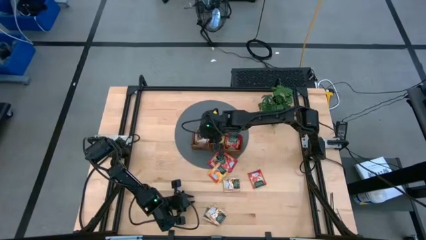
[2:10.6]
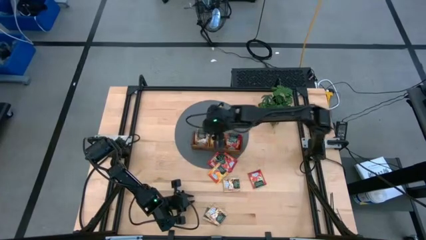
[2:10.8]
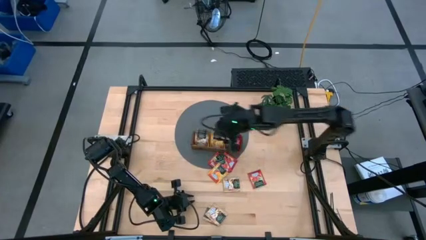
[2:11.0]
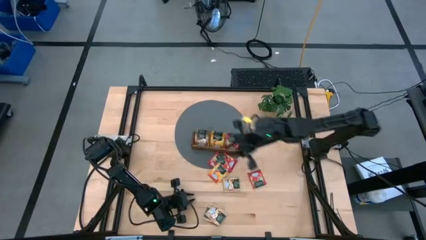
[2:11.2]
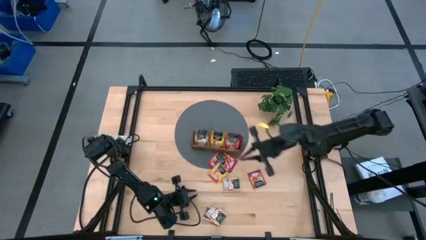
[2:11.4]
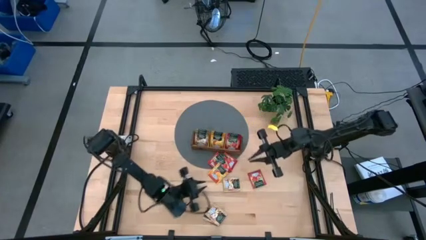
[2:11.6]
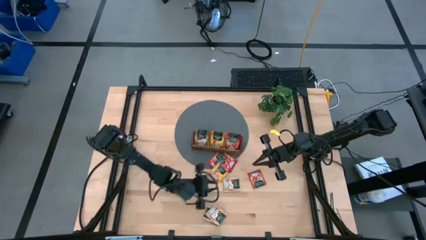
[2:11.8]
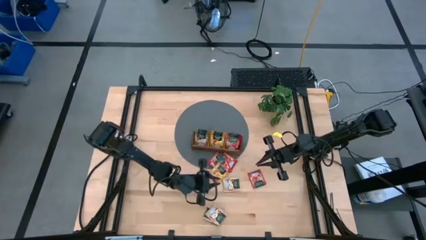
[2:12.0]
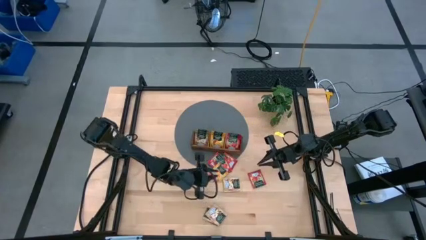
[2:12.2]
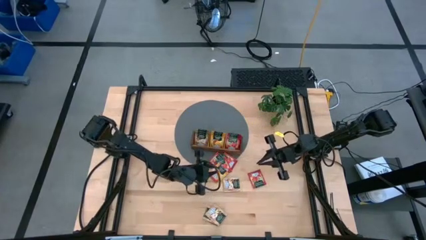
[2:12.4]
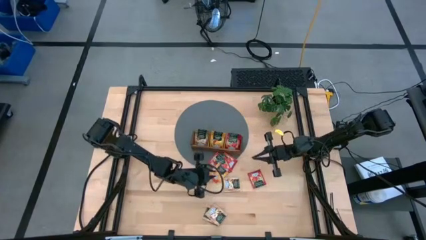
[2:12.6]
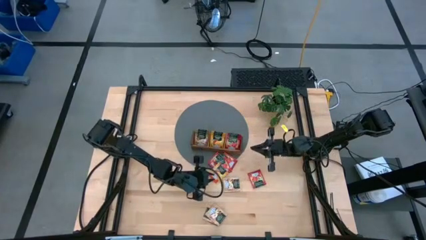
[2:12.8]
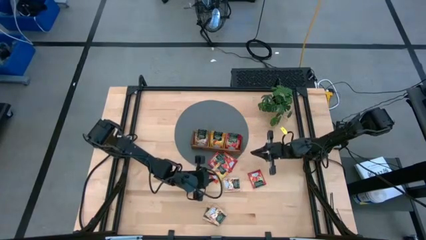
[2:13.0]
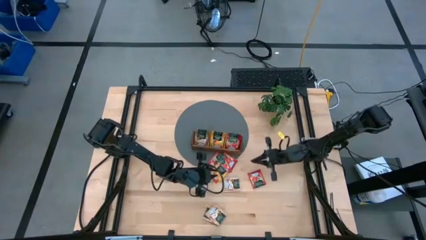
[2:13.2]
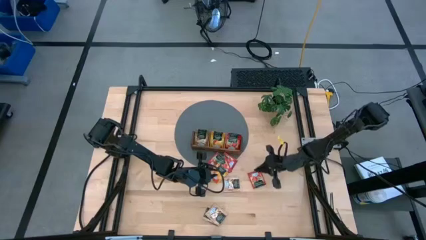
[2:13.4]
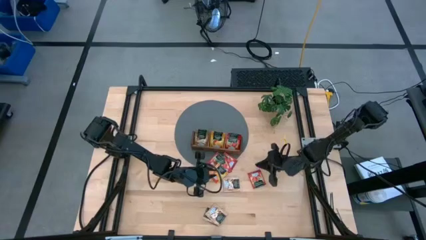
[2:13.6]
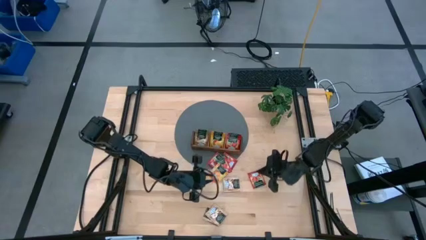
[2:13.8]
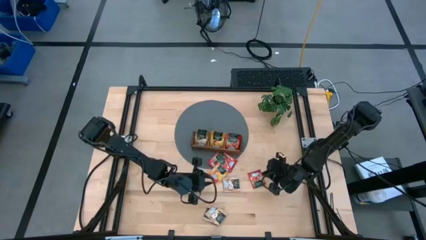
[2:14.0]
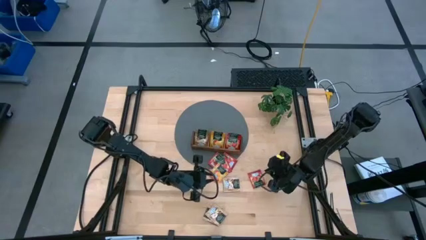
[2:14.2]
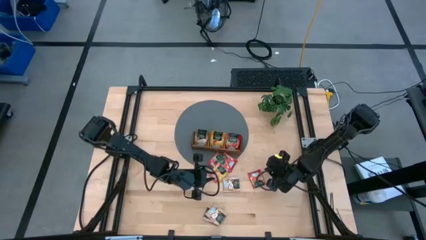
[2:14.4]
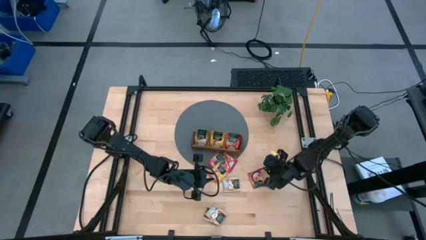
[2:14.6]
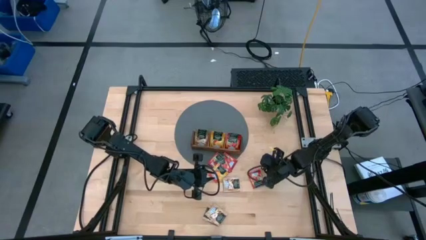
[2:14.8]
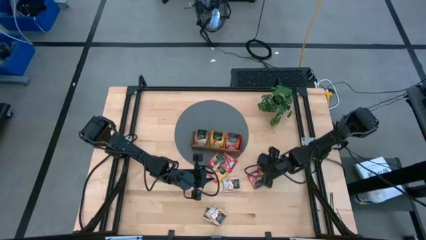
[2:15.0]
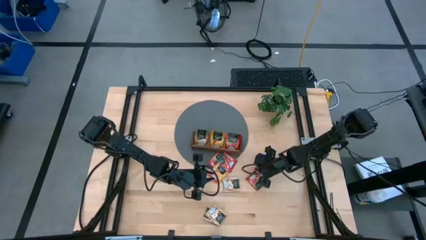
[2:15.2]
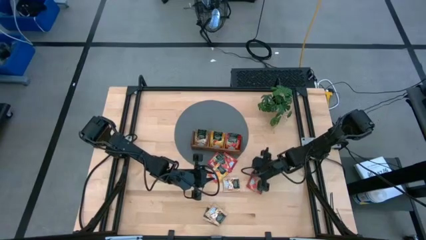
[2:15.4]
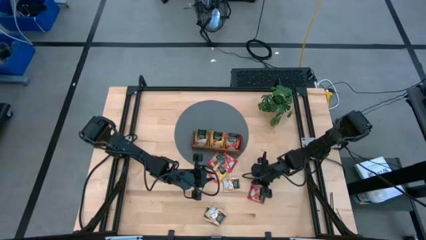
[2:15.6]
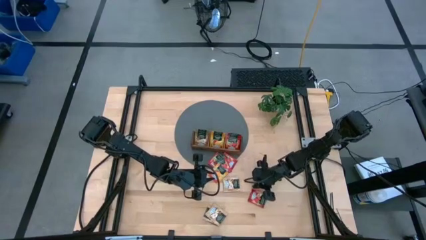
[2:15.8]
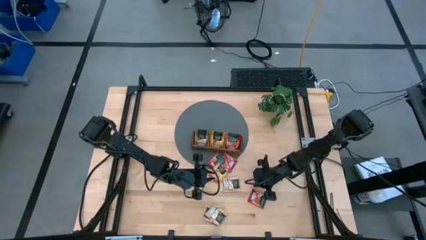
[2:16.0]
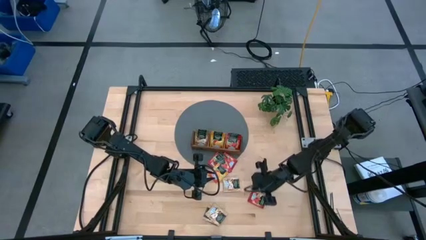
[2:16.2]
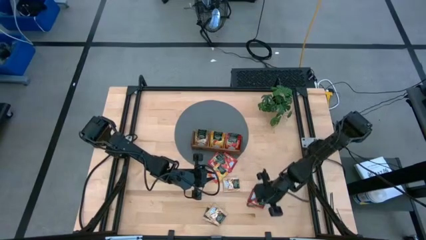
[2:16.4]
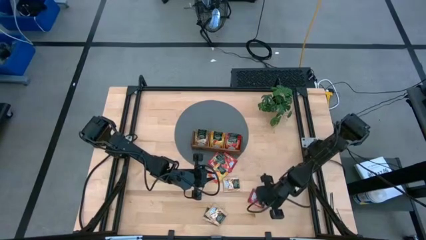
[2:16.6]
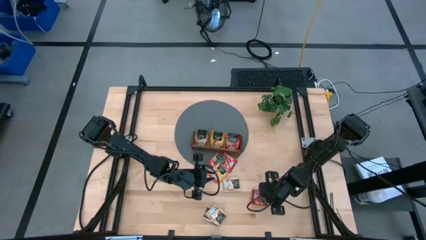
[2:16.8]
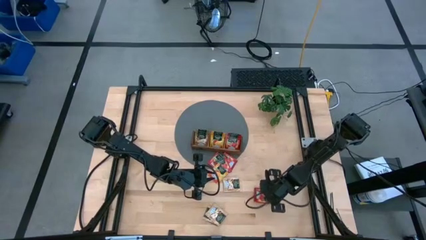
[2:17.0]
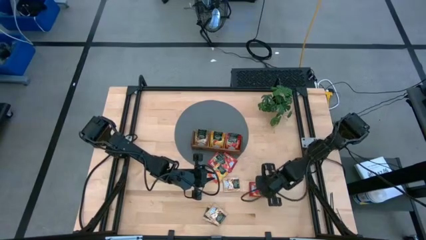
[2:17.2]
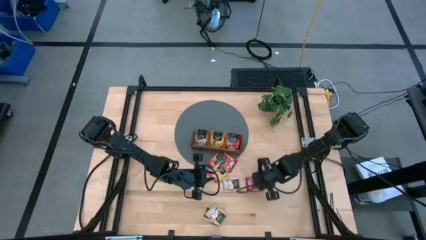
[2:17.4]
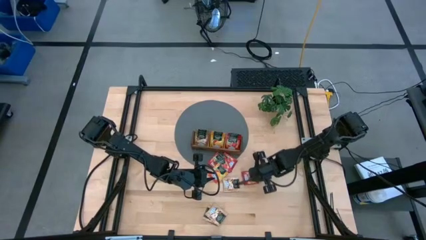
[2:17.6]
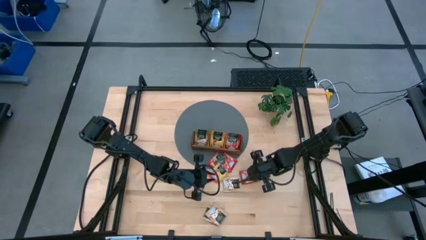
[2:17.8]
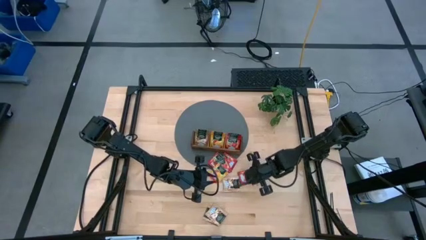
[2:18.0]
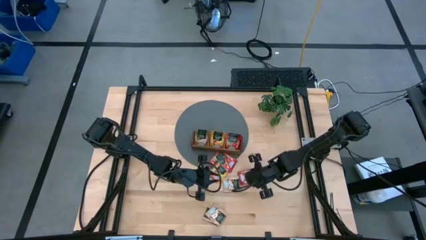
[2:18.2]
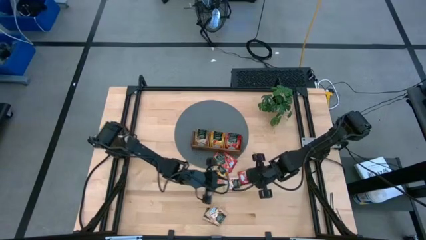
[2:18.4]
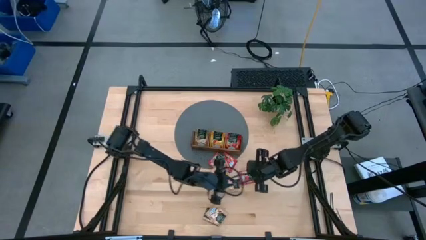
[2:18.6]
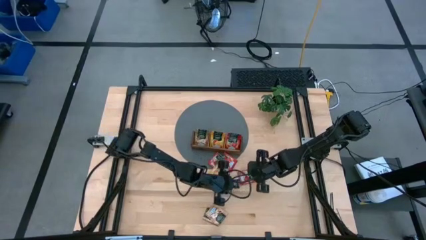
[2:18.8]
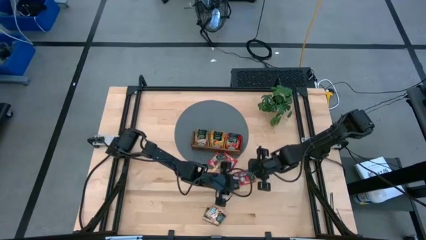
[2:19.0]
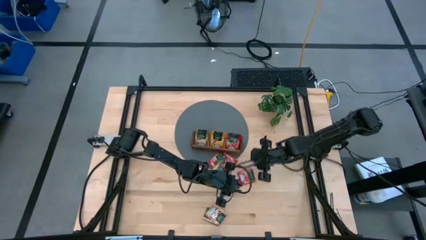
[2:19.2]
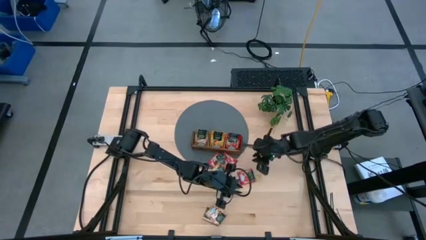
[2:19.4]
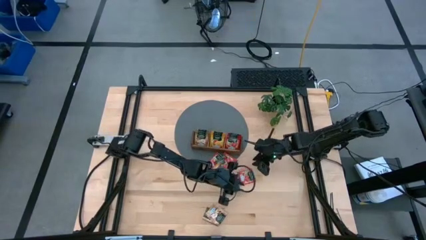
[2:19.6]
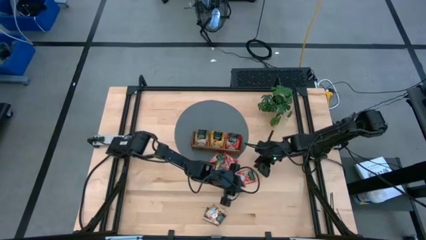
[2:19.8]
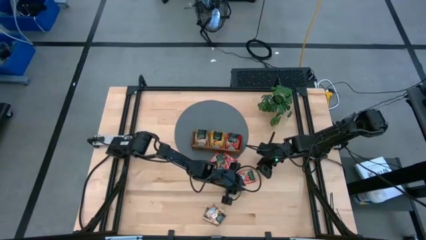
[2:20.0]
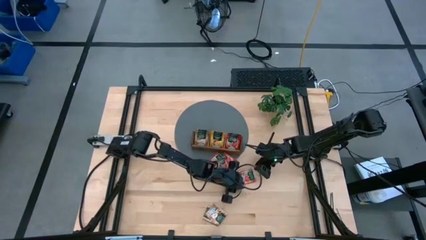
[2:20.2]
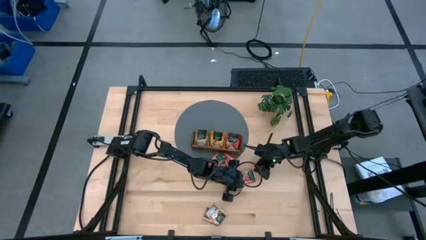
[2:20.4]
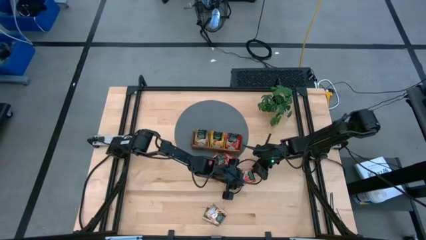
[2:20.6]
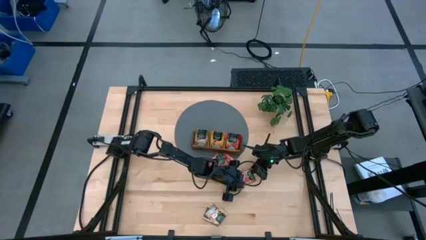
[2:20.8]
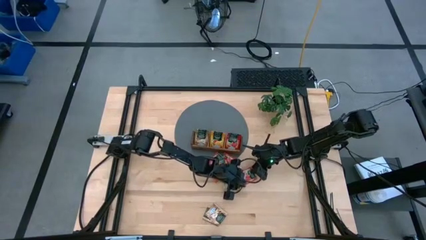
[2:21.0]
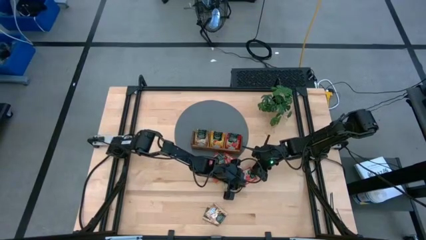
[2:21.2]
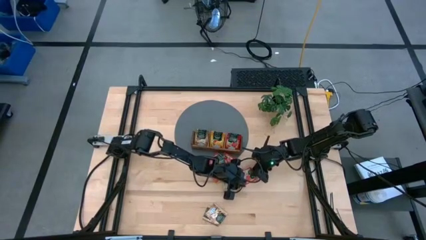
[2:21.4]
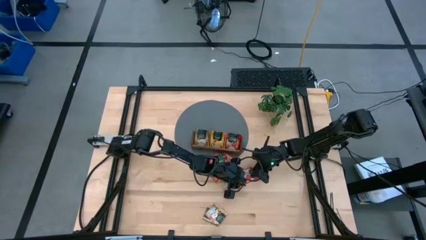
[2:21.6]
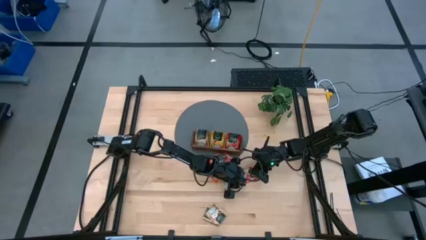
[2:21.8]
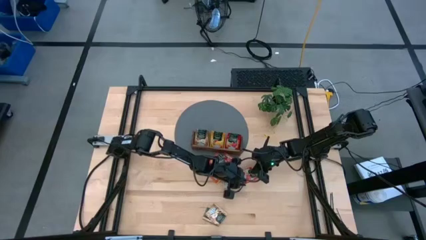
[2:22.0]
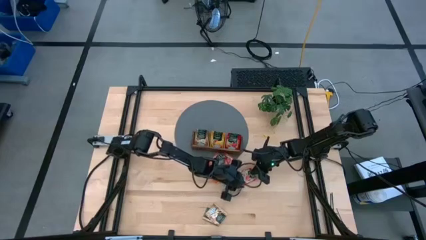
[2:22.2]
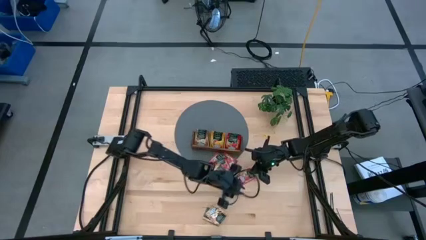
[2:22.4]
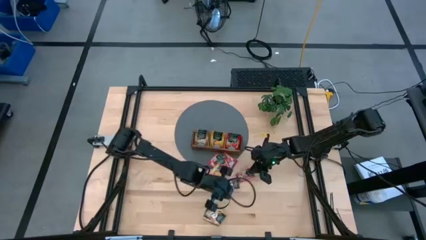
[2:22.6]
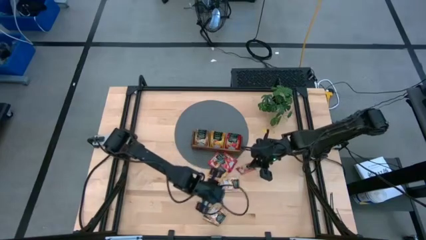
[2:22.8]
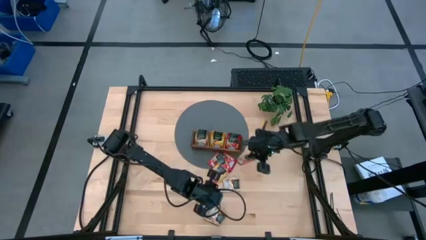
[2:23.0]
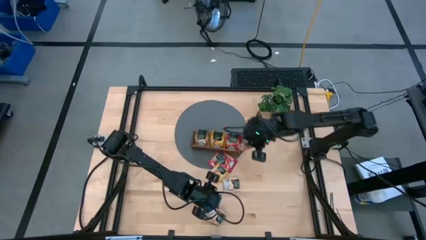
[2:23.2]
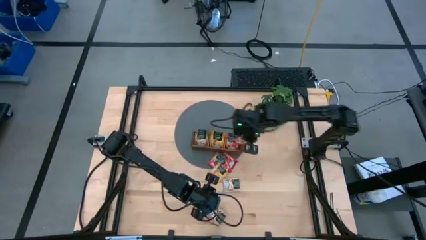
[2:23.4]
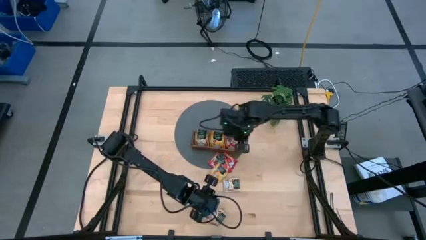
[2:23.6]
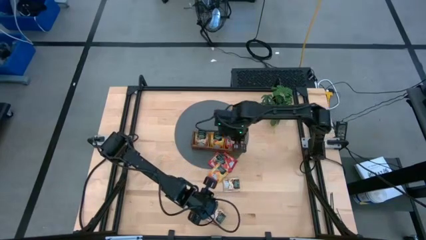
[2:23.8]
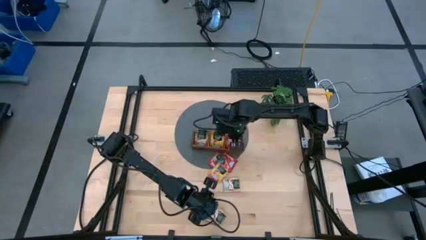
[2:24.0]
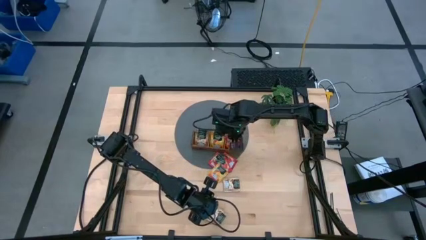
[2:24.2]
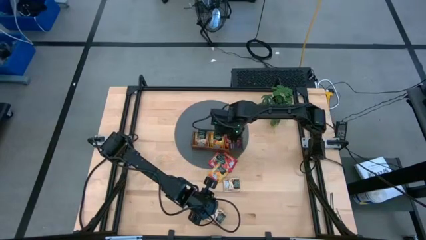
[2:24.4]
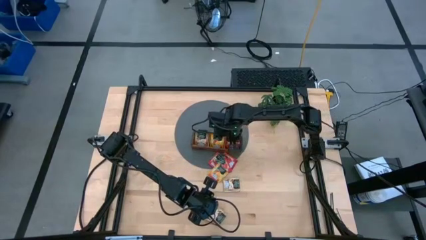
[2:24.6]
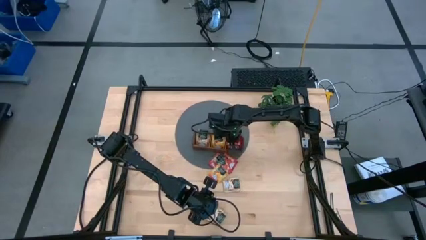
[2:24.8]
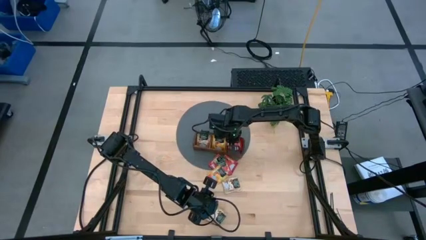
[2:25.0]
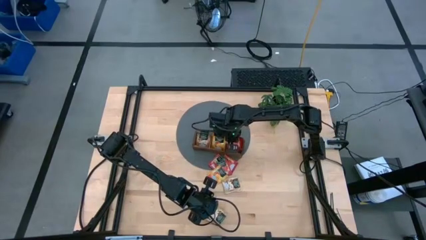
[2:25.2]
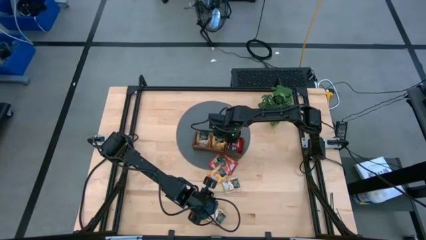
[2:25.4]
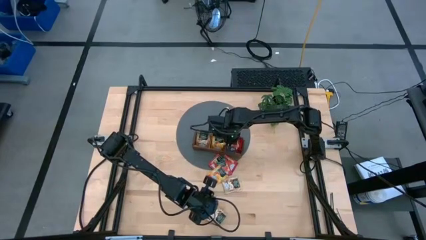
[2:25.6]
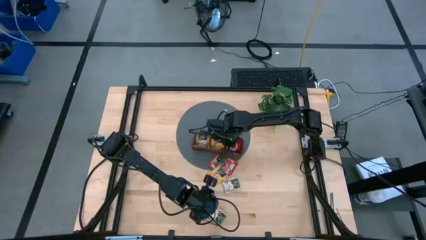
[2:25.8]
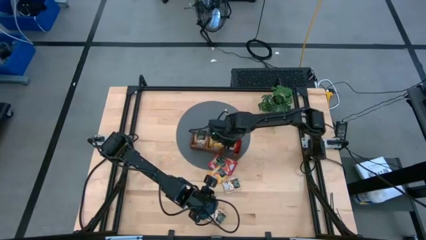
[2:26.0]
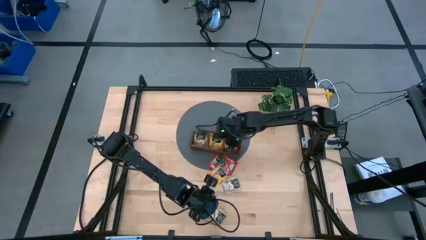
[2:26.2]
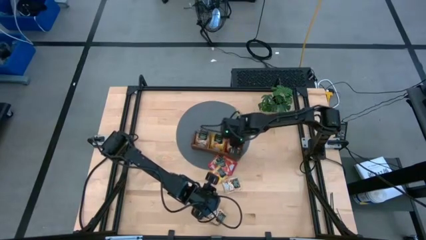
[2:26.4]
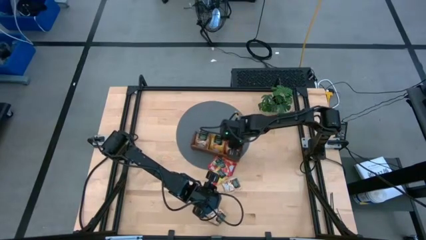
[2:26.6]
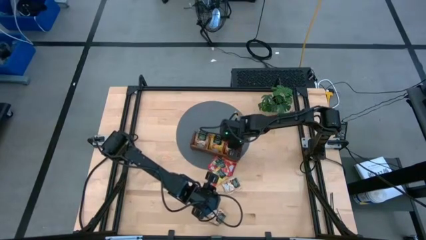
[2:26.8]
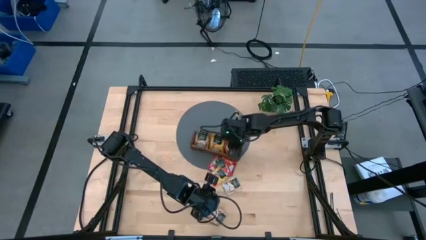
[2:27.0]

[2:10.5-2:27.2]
Task: Pick & Place Tea
Put the red tea bag into the right section of the wooden organizer

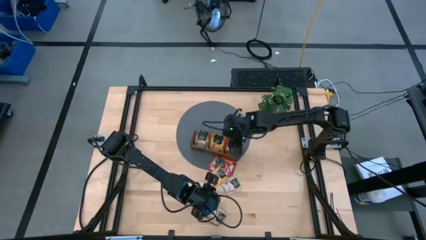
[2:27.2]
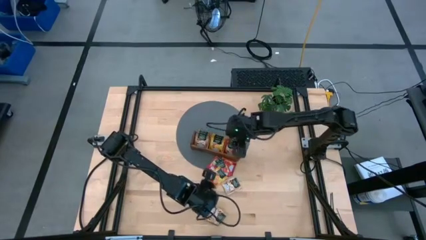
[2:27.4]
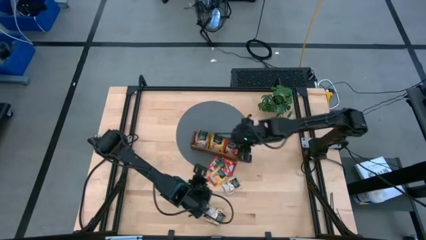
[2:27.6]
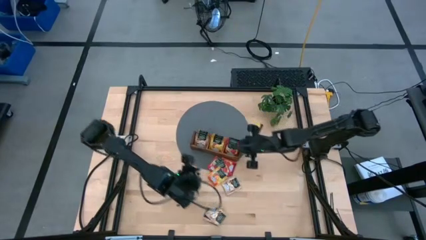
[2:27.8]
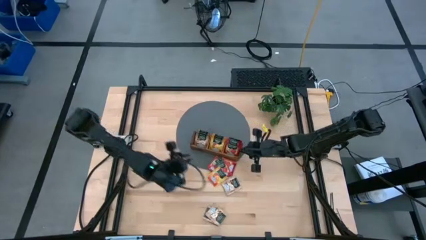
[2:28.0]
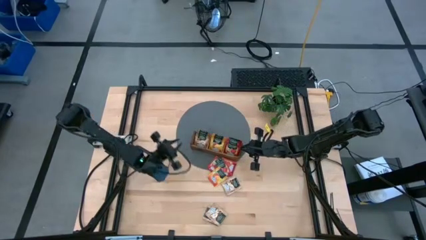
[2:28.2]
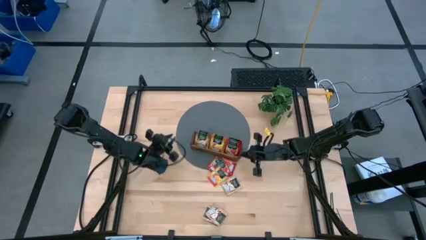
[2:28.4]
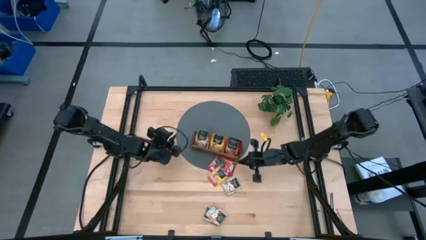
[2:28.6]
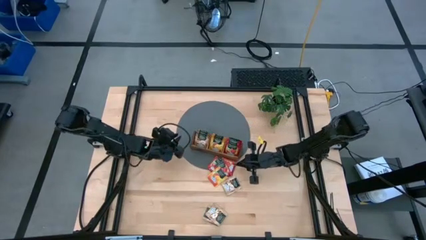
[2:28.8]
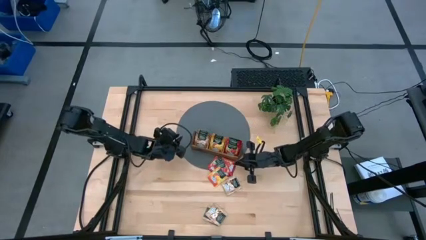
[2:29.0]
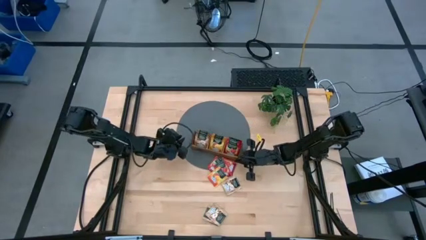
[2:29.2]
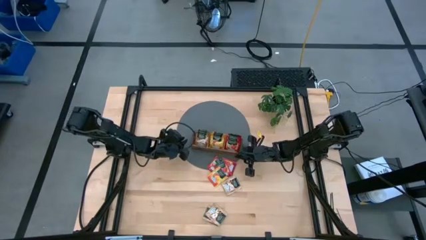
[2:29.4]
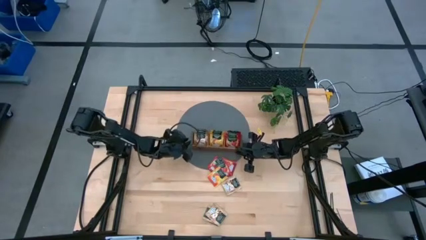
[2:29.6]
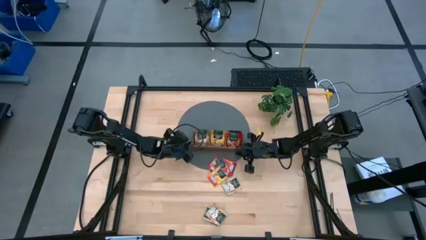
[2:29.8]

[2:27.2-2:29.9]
Adjust the wooden organizer
